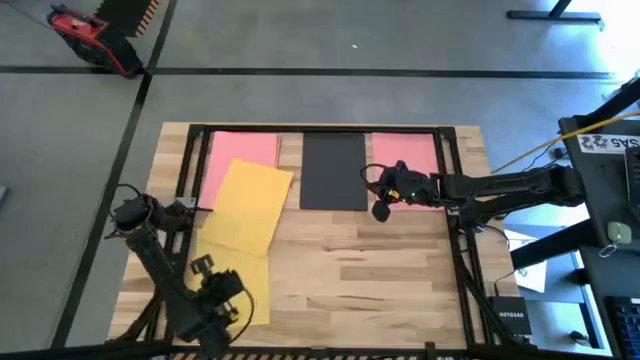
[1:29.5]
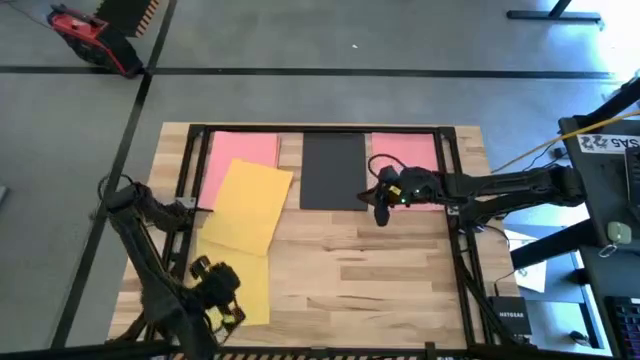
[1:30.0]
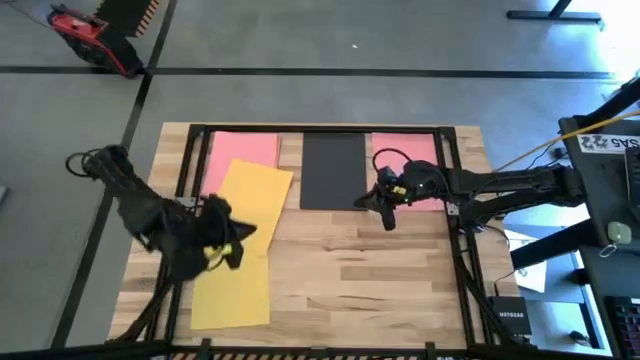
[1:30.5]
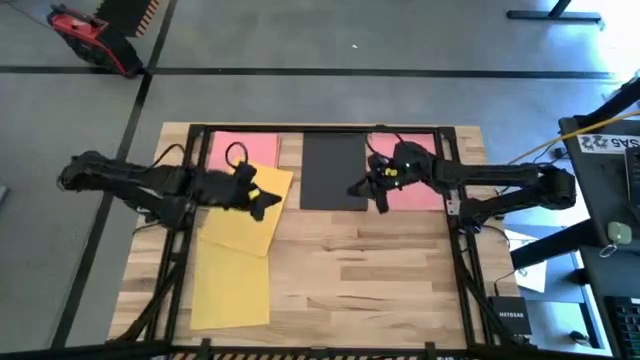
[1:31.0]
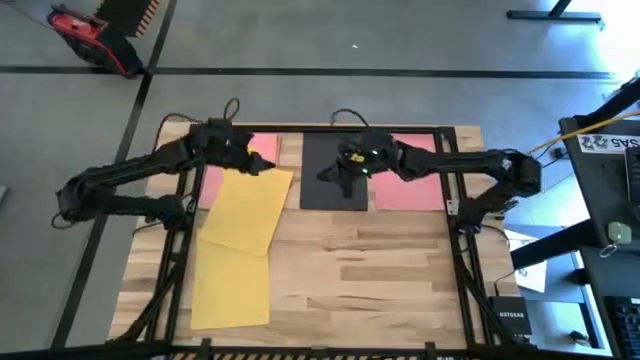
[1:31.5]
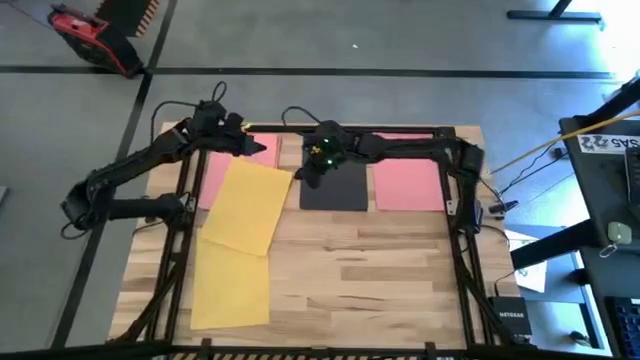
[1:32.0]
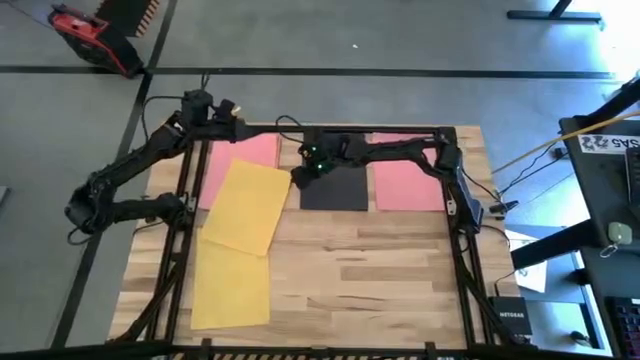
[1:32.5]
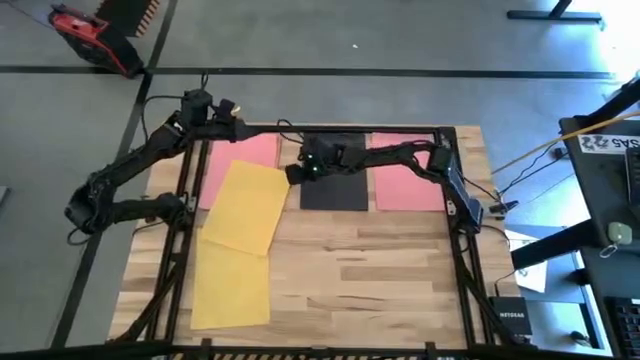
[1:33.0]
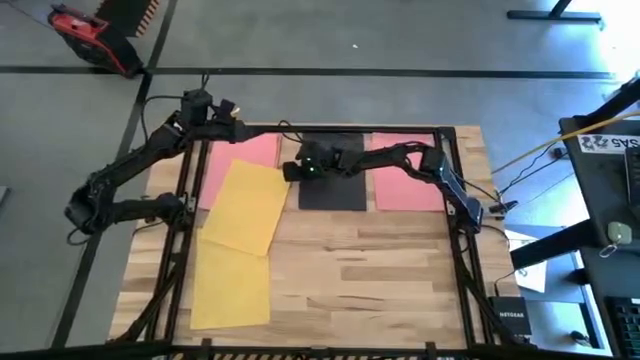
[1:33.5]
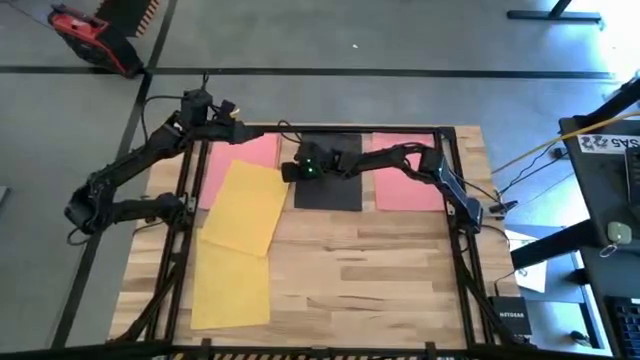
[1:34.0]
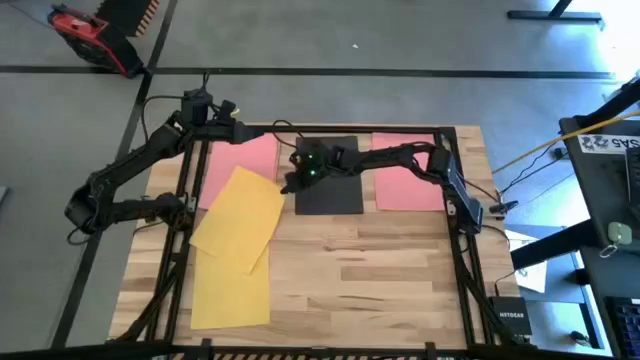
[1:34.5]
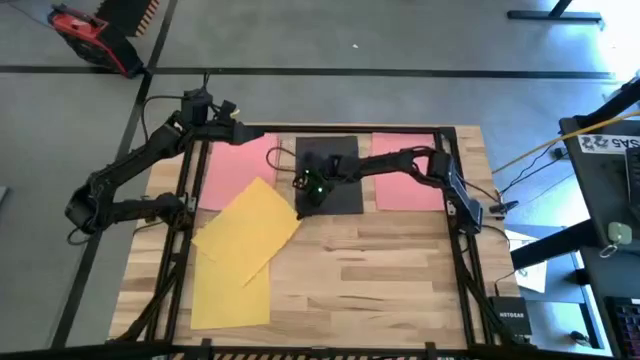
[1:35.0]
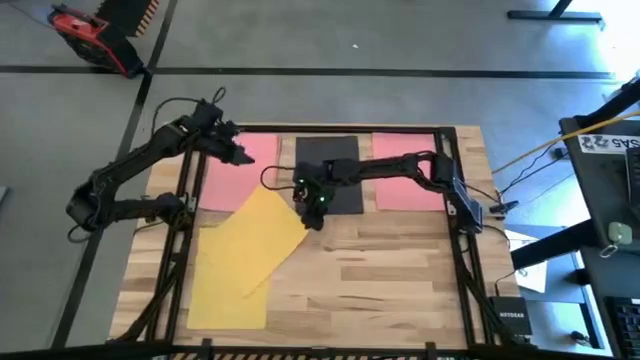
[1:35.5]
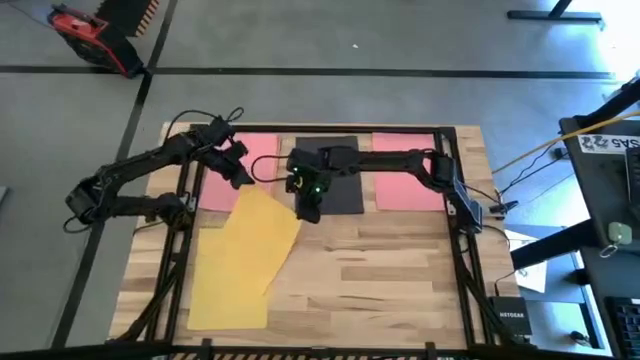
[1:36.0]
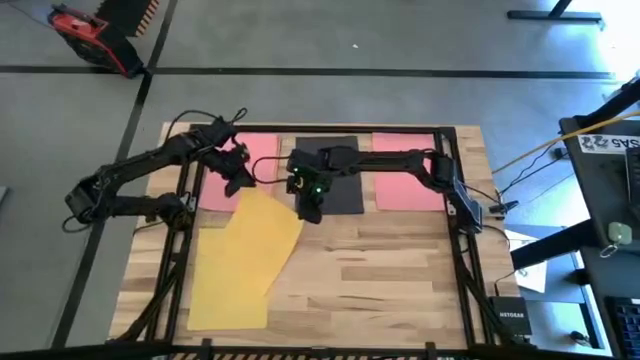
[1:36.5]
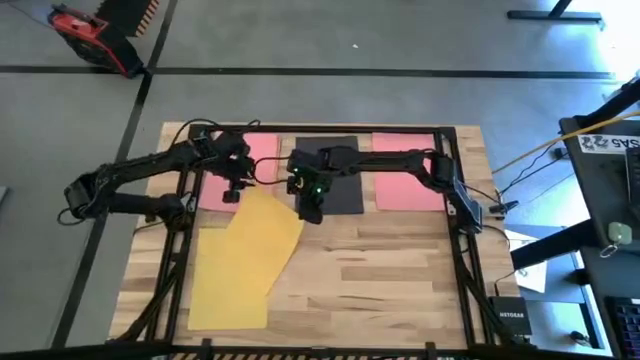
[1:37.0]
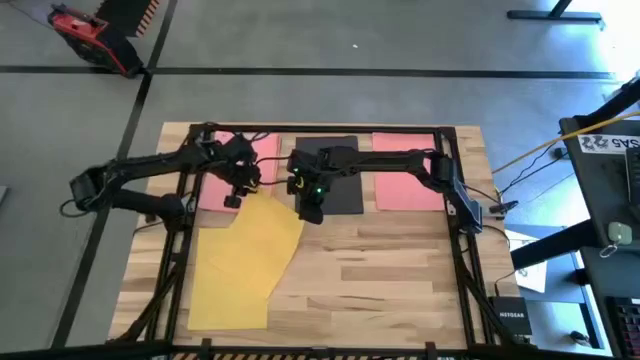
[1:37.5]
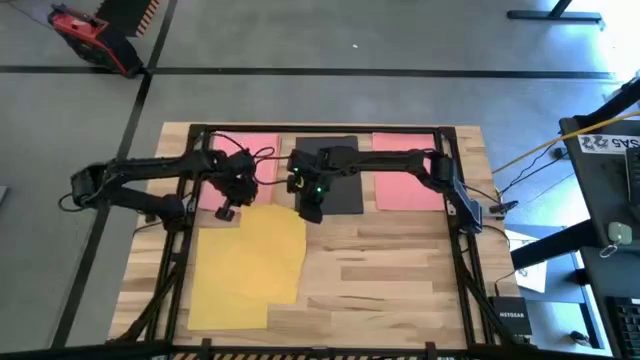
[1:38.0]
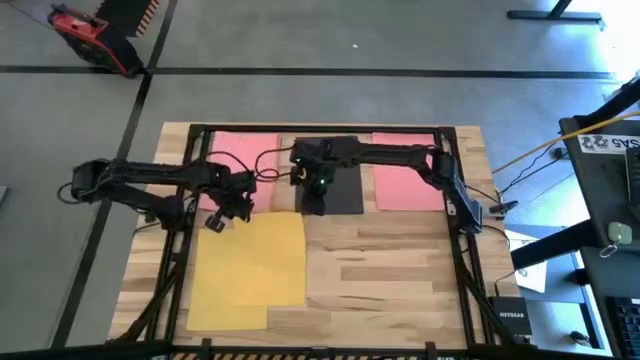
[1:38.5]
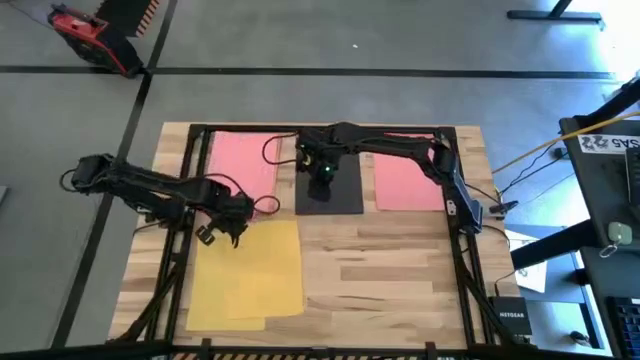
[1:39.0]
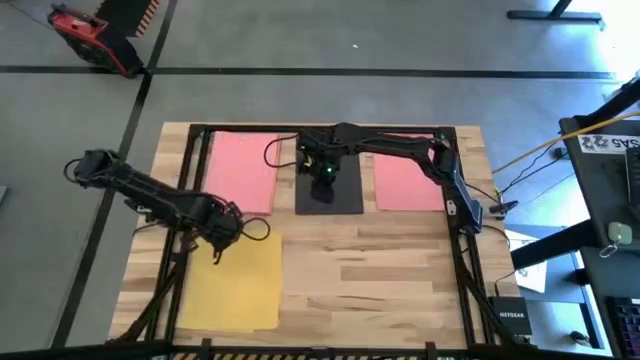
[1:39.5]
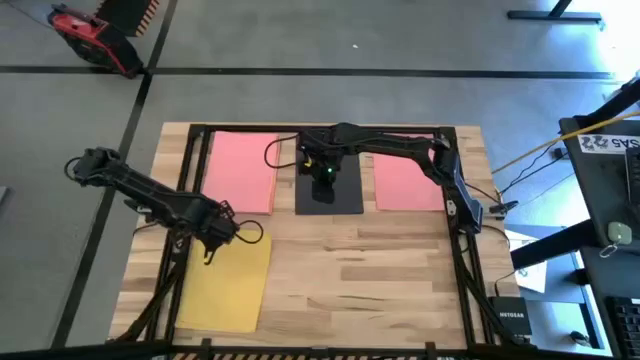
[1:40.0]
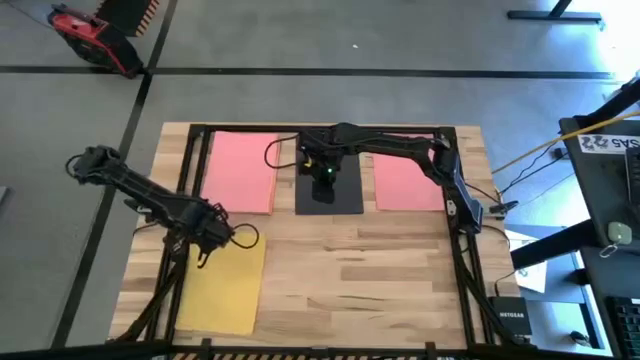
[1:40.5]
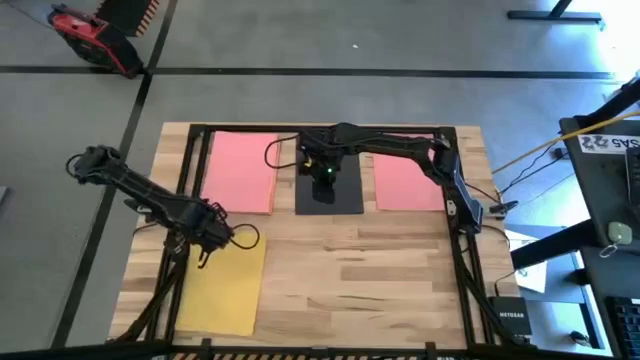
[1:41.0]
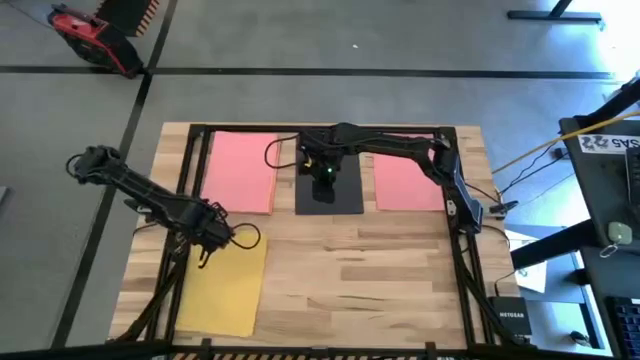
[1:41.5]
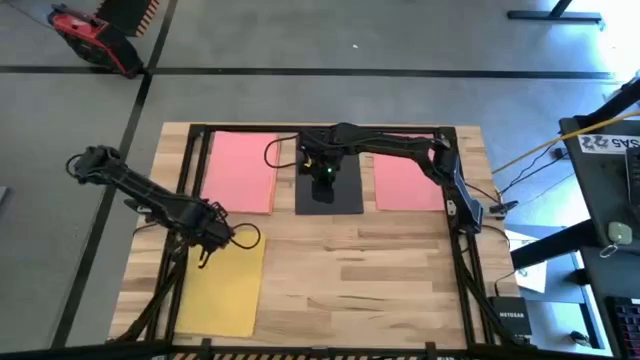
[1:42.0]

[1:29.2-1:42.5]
Task: Organize paper
Stack the yellow paper on top of the other yellow paper

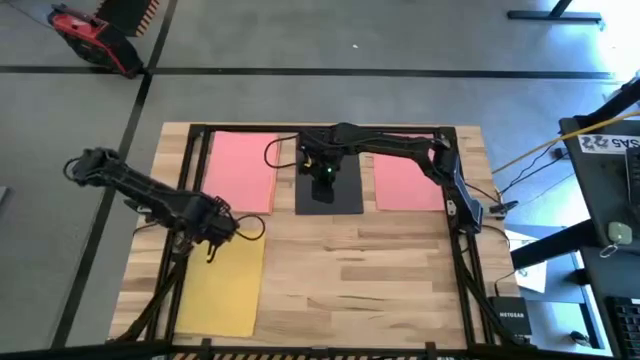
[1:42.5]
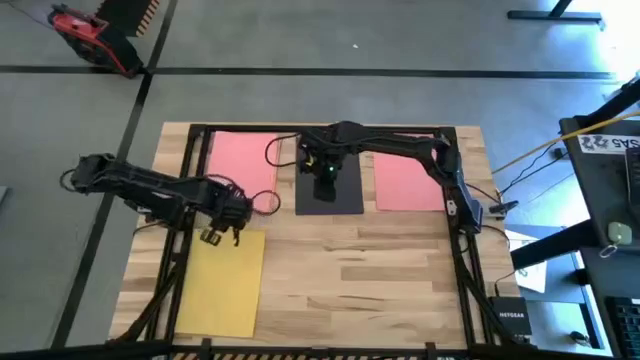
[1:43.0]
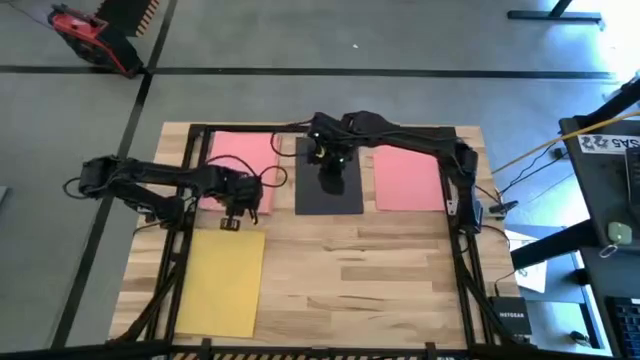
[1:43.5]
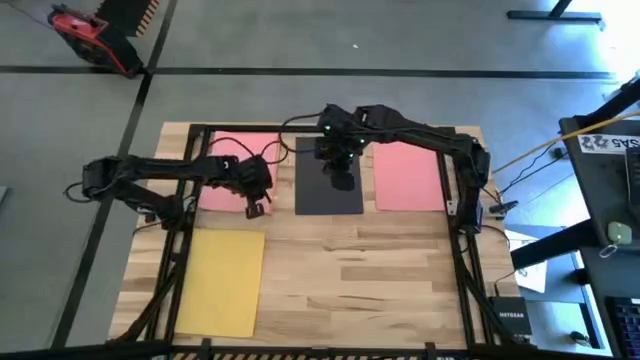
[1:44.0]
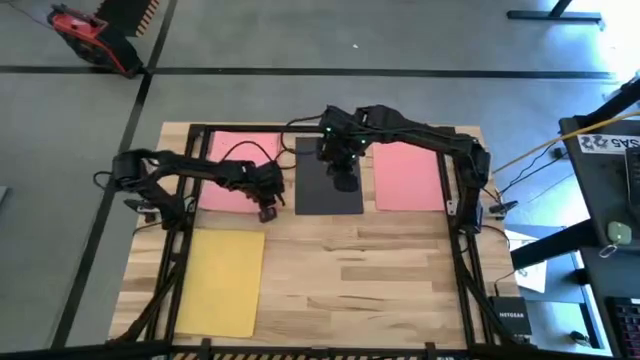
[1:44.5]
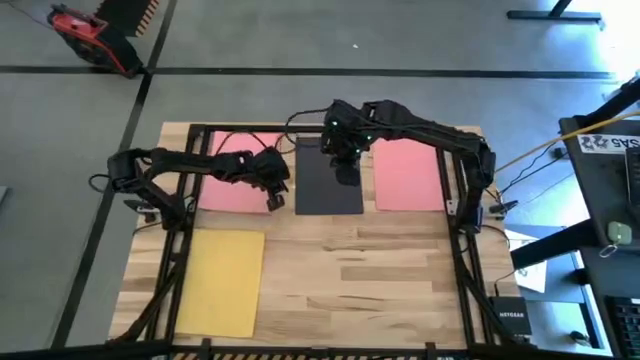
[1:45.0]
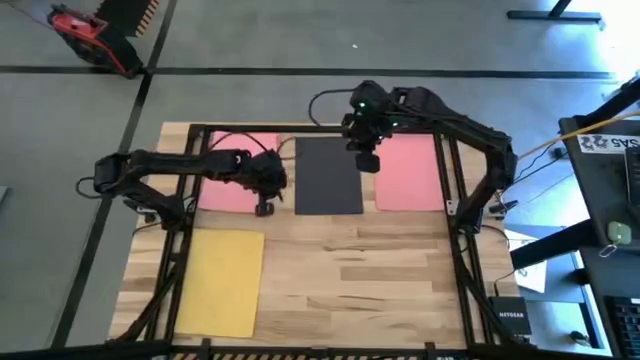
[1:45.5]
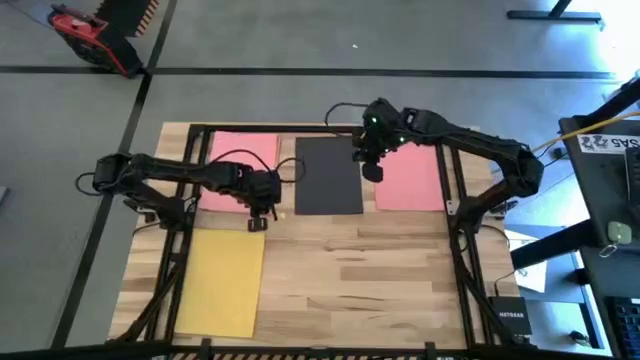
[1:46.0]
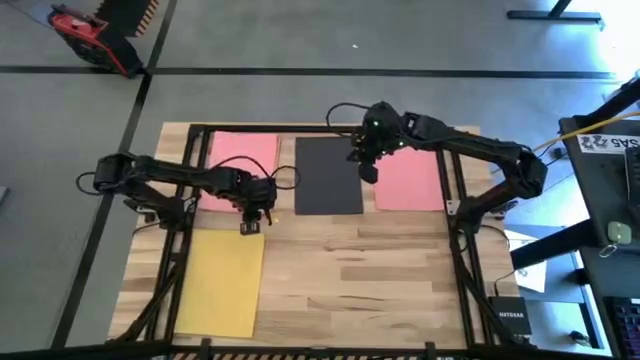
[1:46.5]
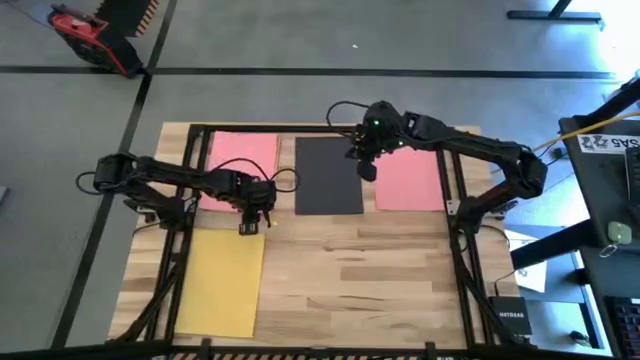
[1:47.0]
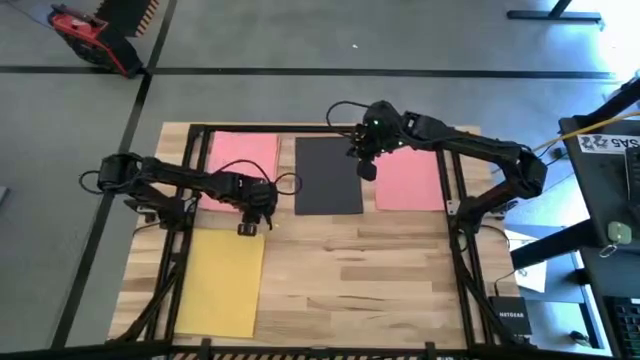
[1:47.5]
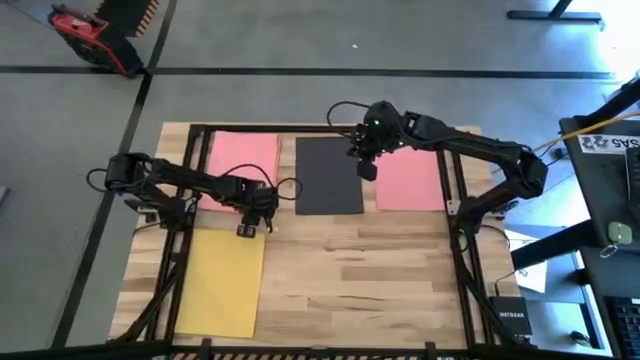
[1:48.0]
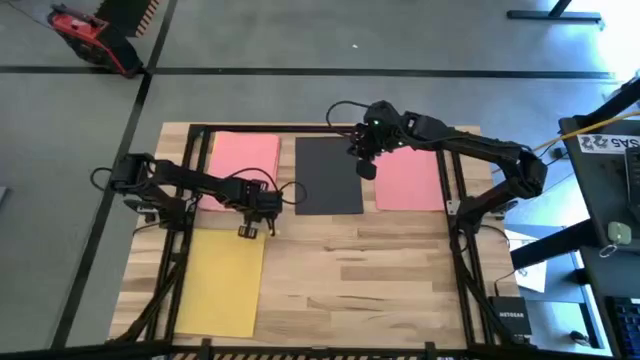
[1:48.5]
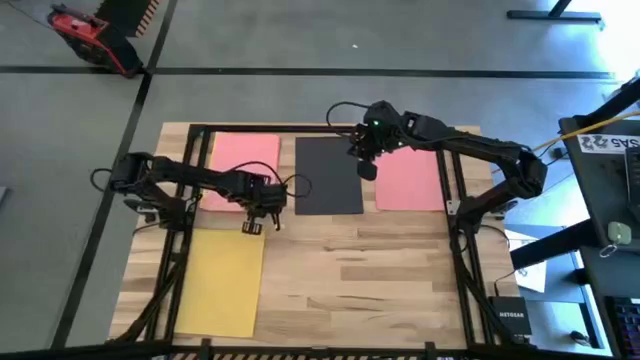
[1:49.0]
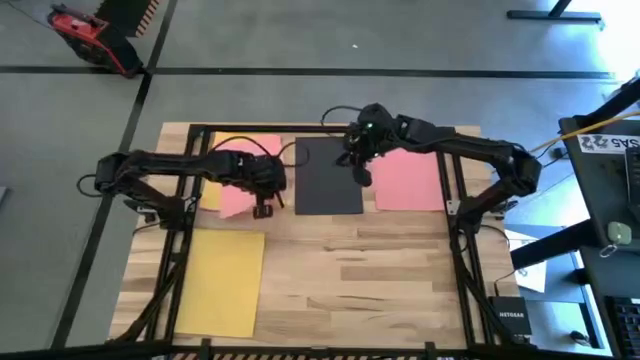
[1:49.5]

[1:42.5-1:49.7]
Stack the pink paper on top of the other pink paper

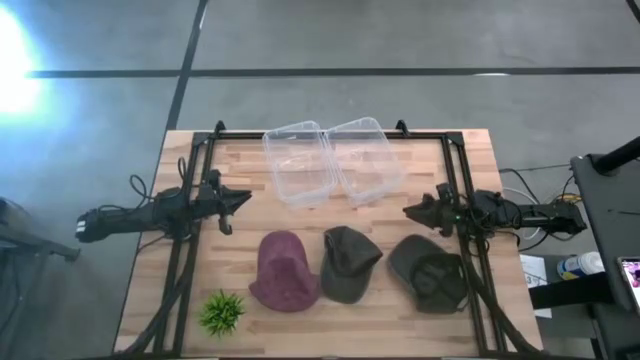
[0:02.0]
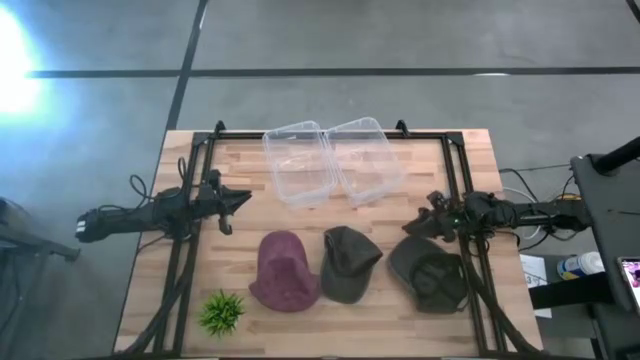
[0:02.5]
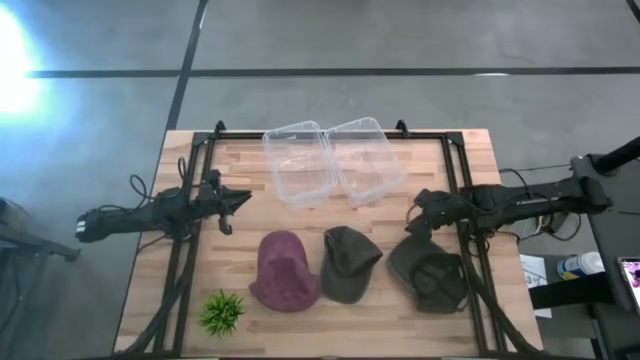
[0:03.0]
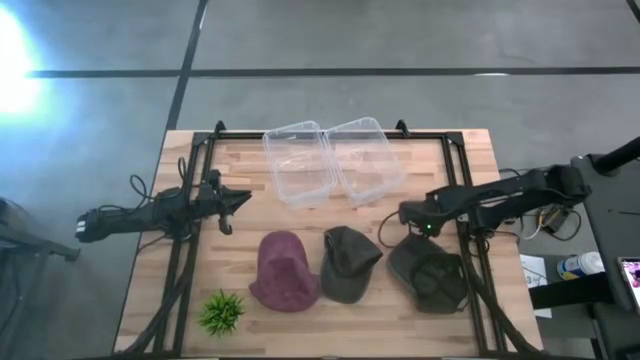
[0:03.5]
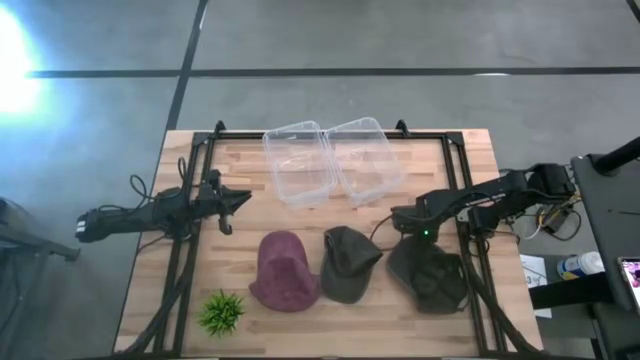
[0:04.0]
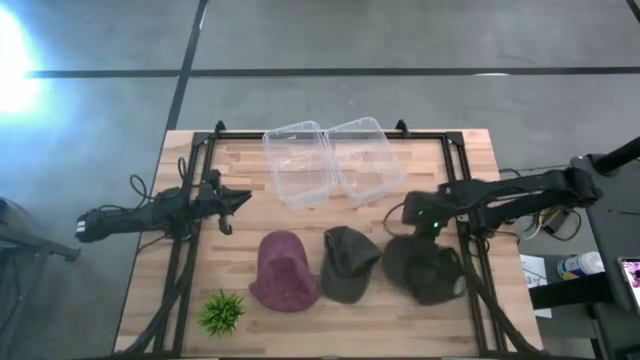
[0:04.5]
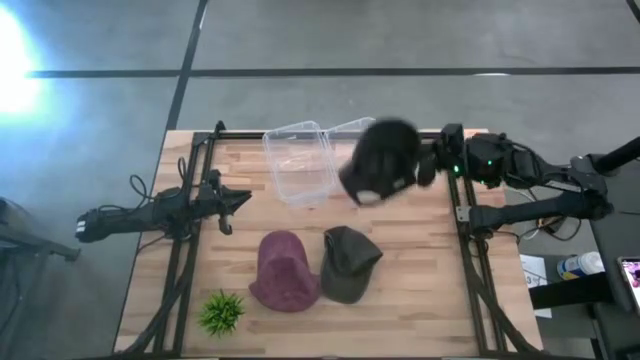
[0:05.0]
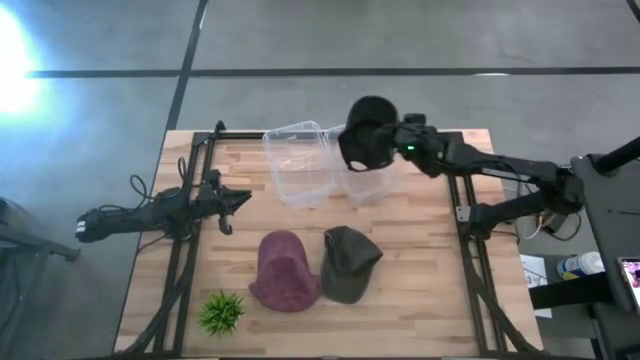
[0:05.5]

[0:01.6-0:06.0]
Task: Pick & Place hat
Put the right black cap into the right transparent bin
